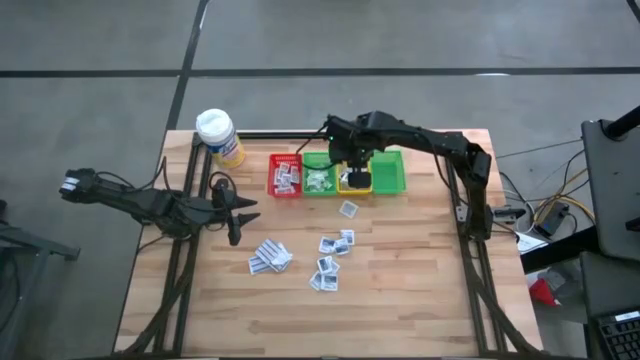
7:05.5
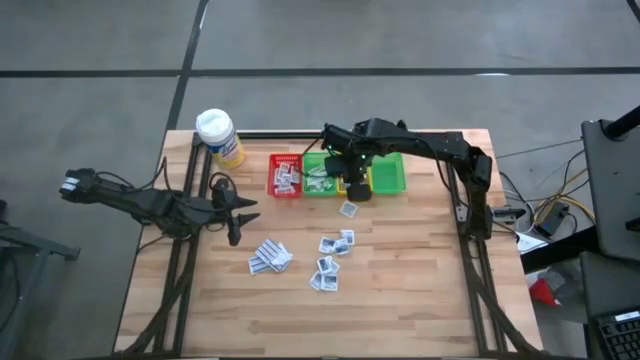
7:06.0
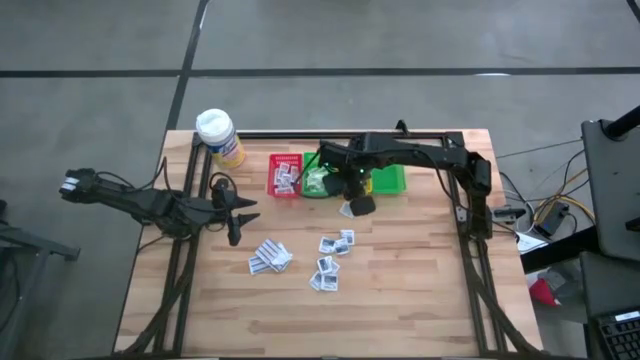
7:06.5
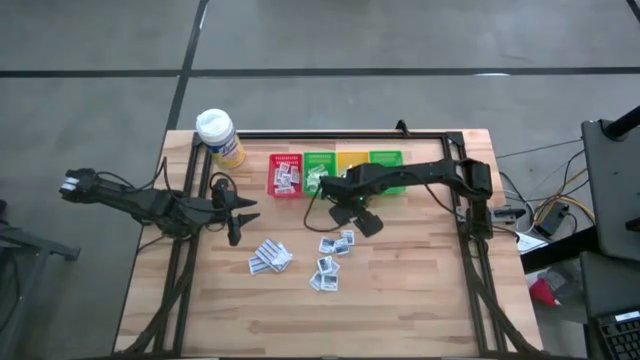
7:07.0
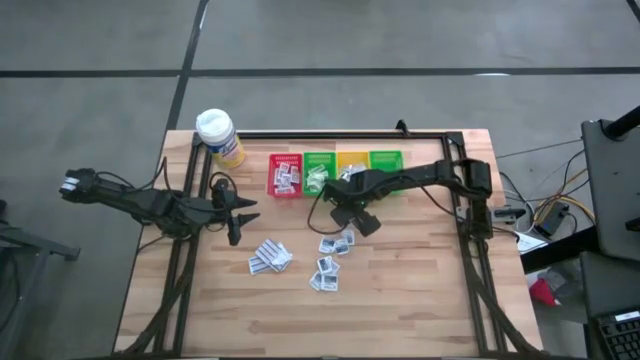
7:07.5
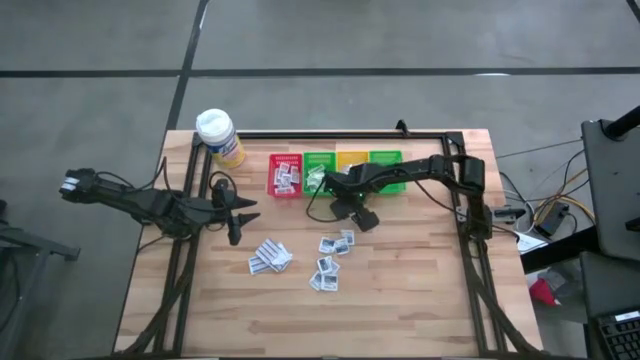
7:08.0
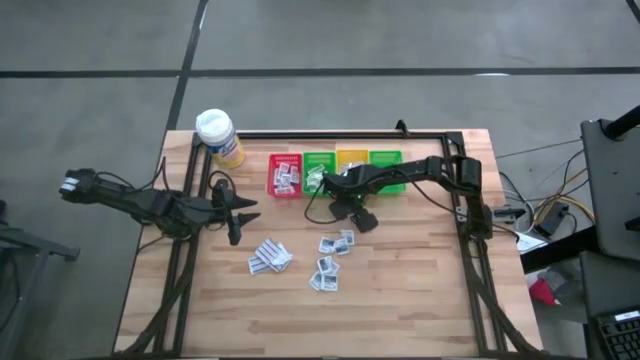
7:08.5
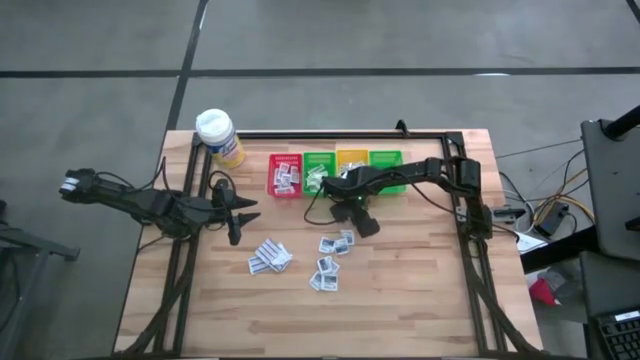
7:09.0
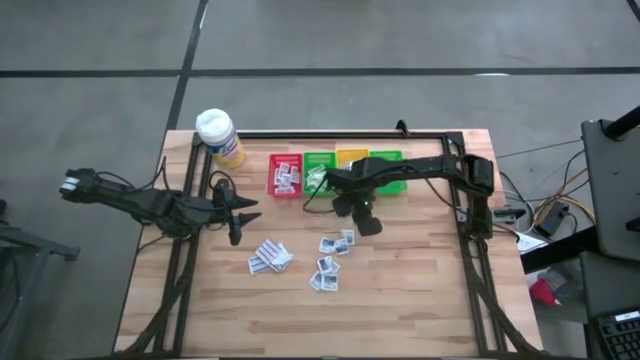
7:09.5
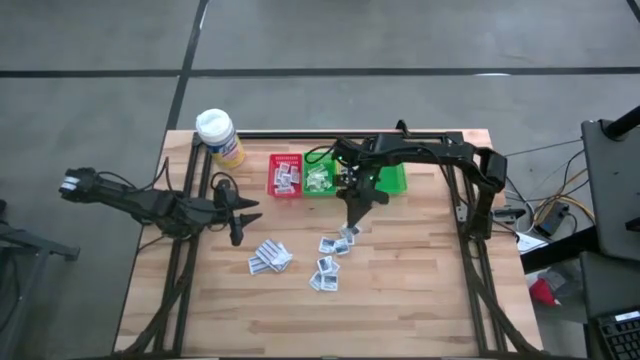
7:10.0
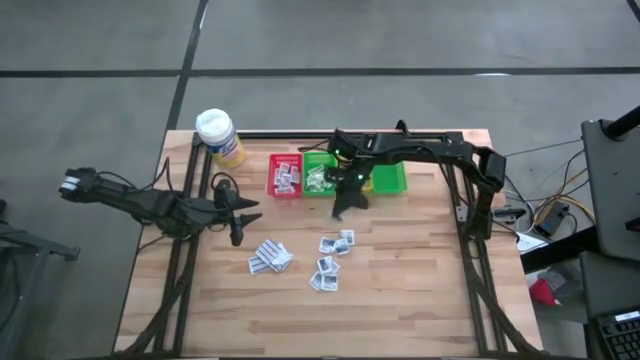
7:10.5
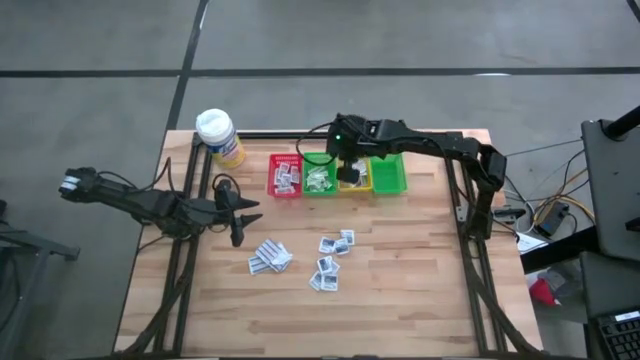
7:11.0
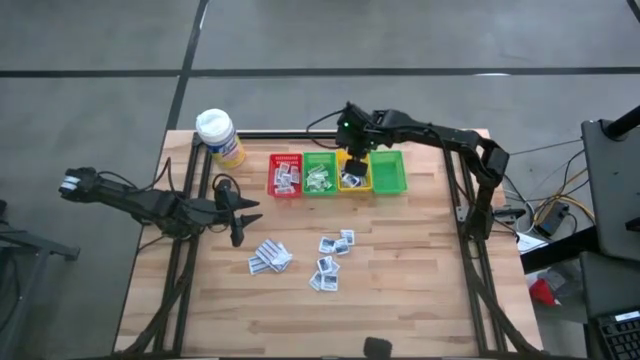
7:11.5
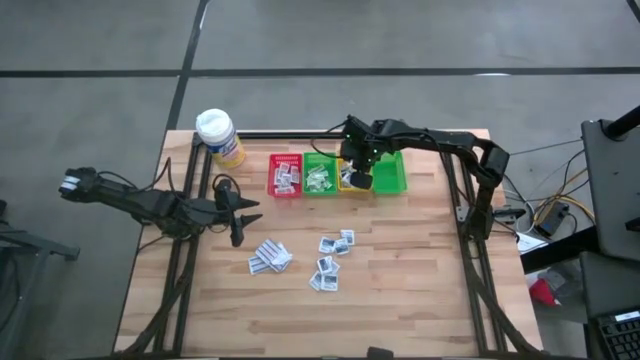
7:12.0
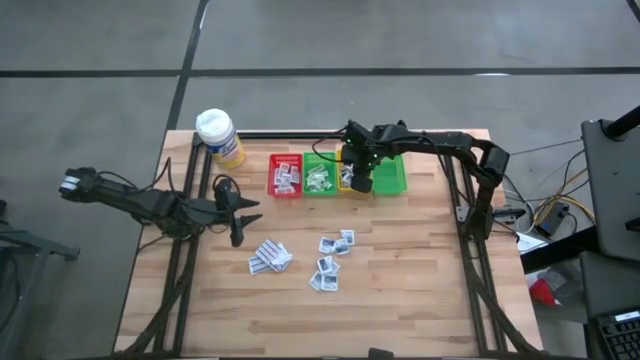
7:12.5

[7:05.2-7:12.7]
Task: Pick & Place First Aid Supplies
Put the alcohol pad into the yellow bin

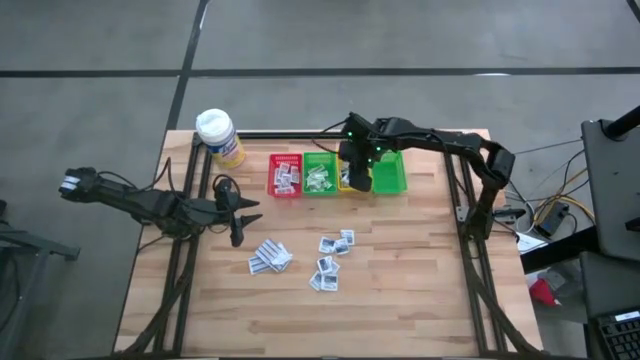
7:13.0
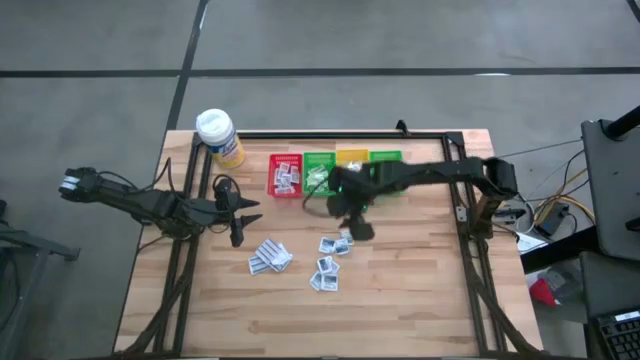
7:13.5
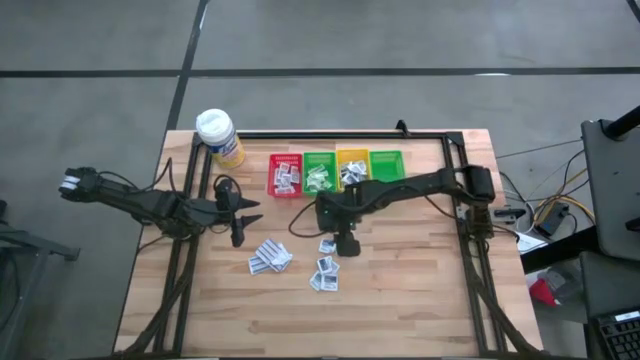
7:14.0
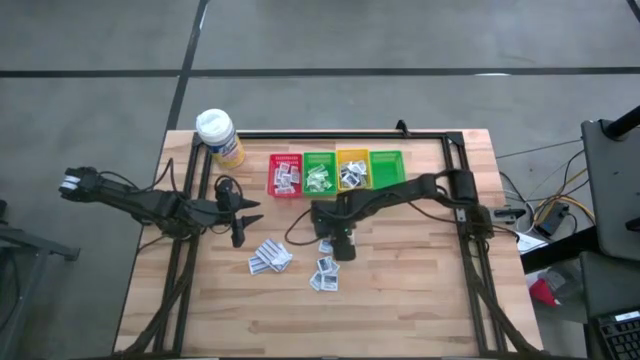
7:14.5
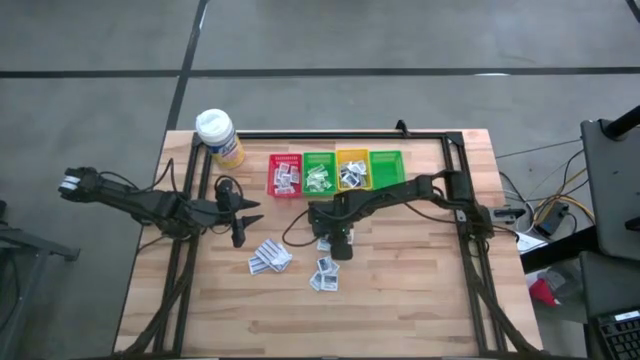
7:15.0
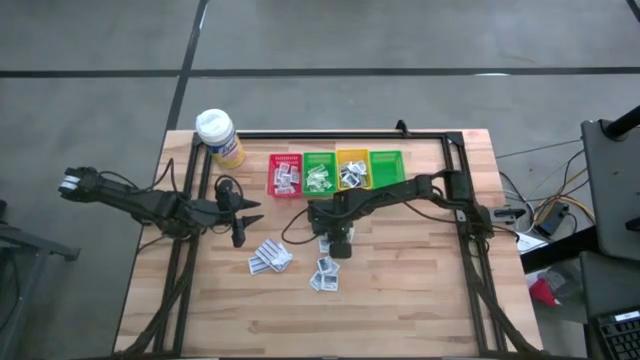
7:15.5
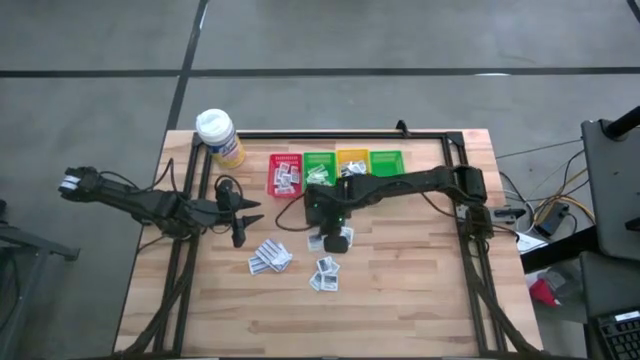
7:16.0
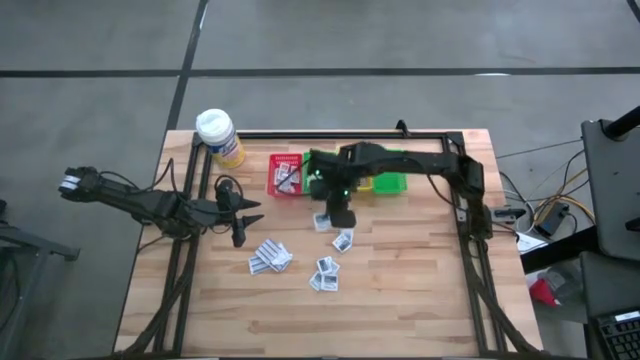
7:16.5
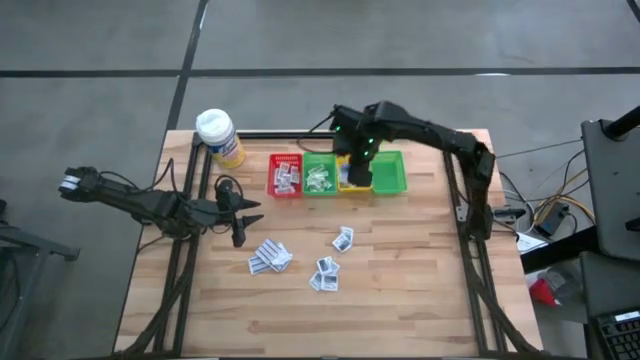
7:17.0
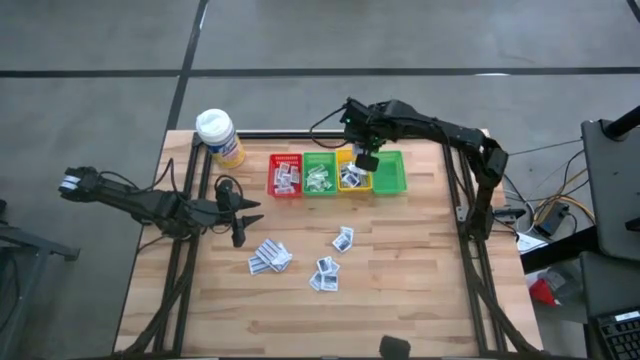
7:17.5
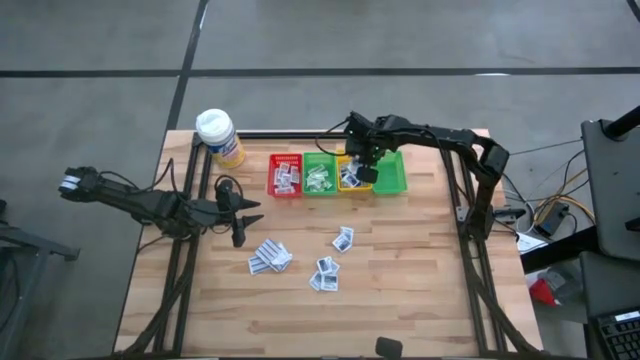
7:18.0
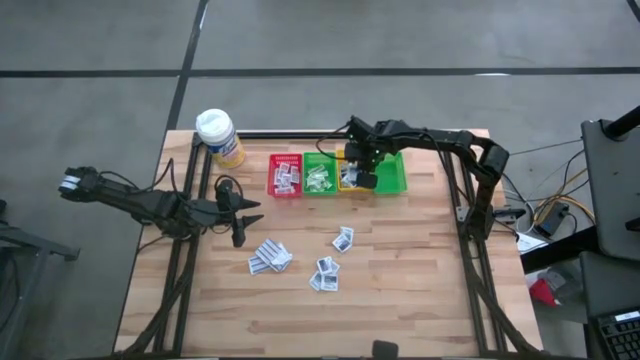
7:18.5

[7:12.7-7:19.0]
Put the alcohol pad into the yellow bin

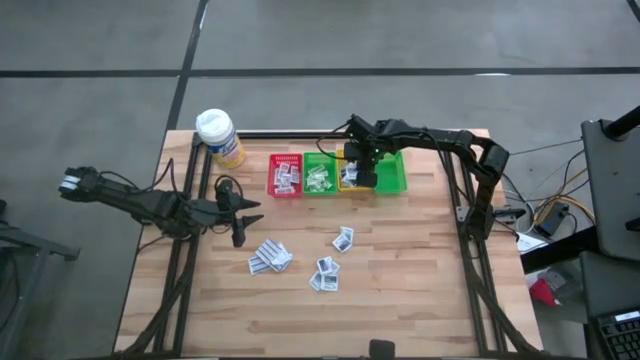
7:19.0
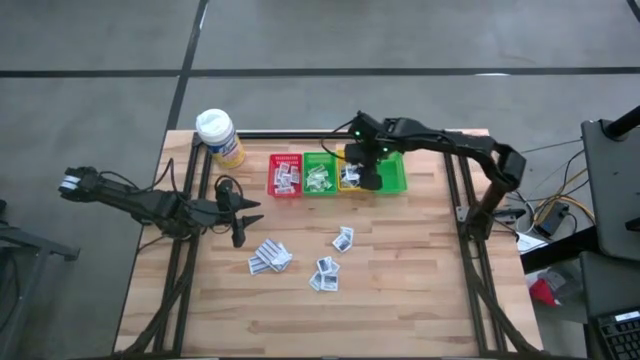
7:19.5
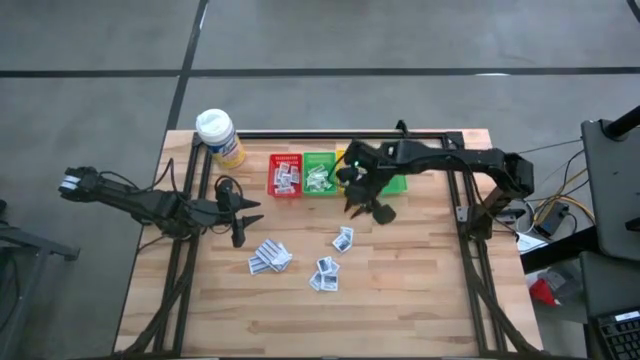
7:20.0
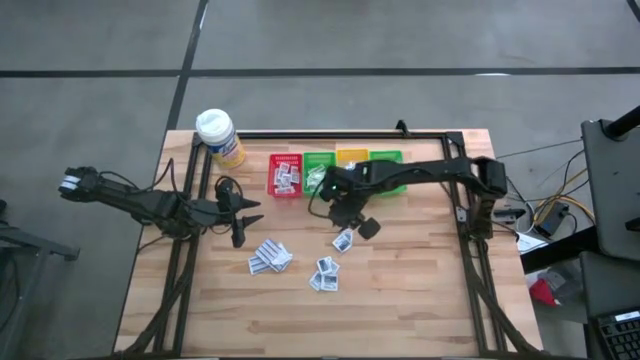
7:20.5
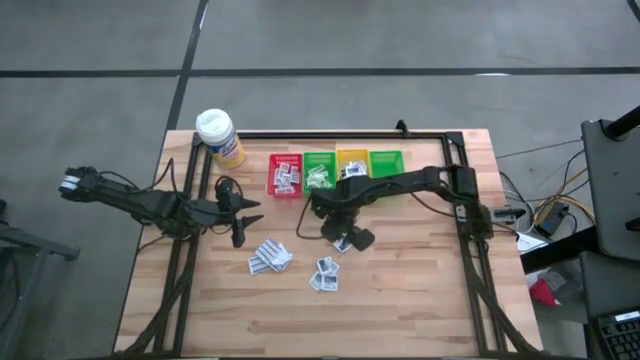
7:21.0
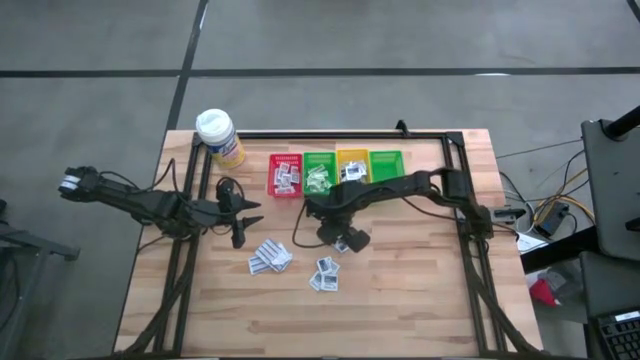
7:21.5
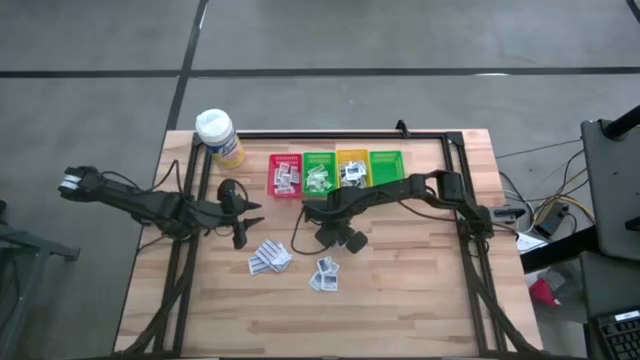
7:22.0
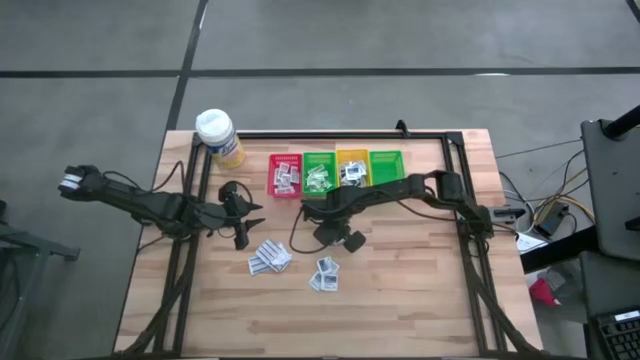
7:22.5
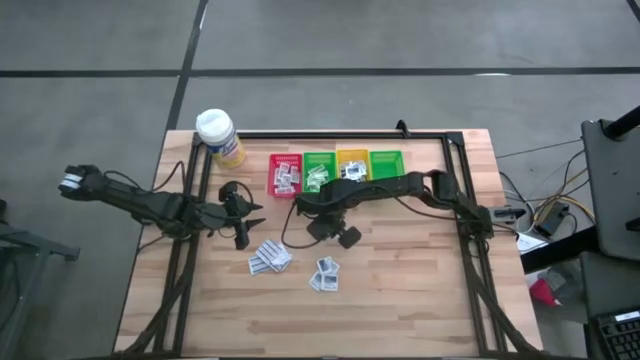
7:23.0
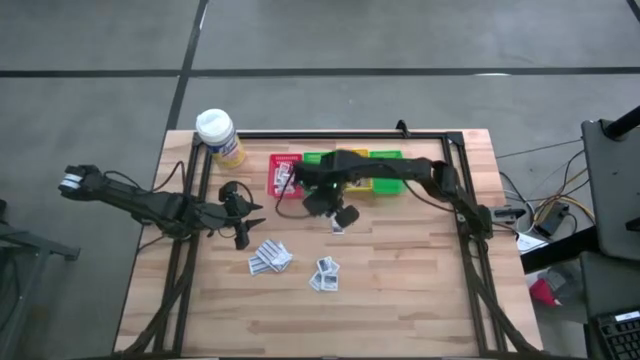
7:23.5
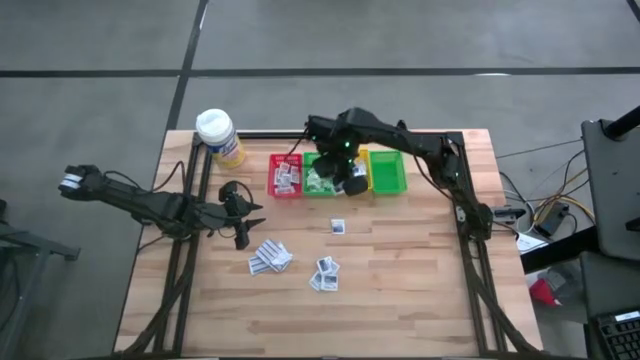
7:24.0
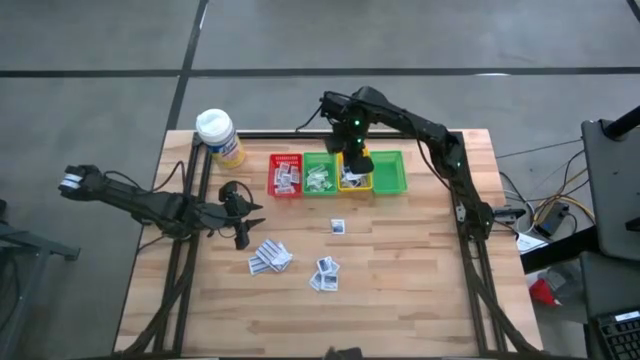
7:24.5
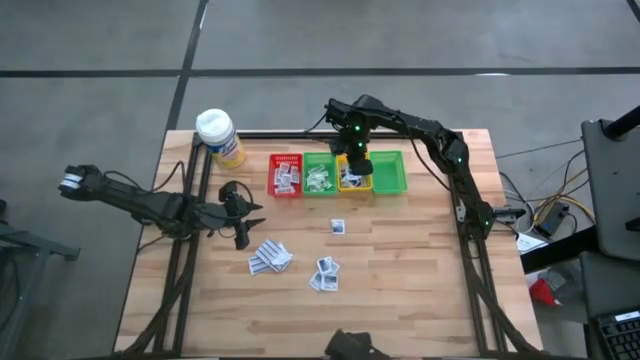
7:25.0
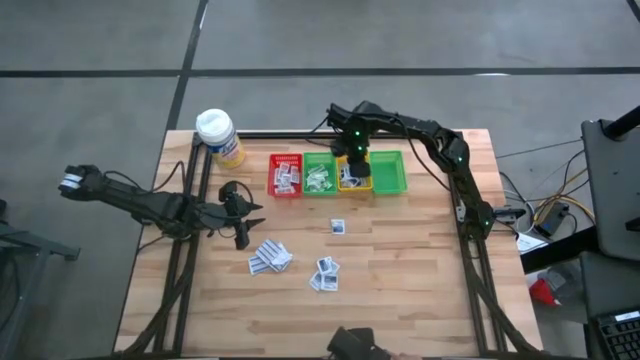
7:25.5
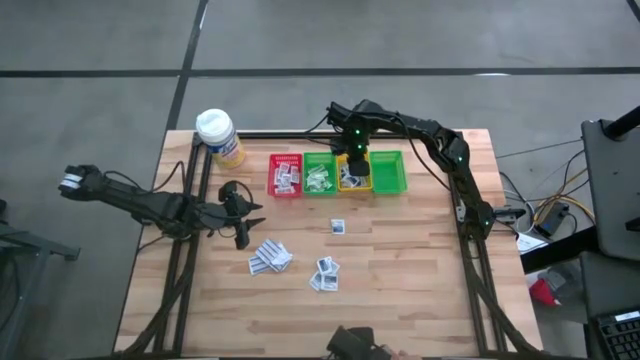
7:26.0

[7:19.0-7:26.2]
Put the alcohol pad into the yellow bin
